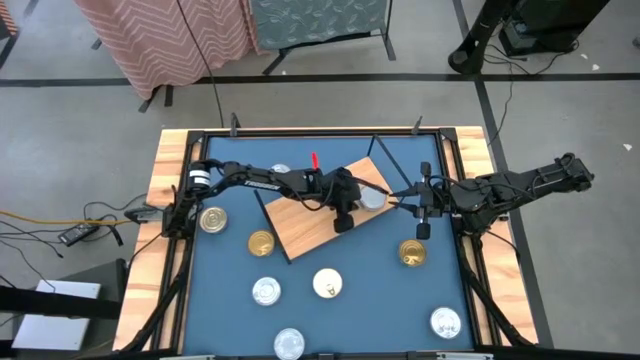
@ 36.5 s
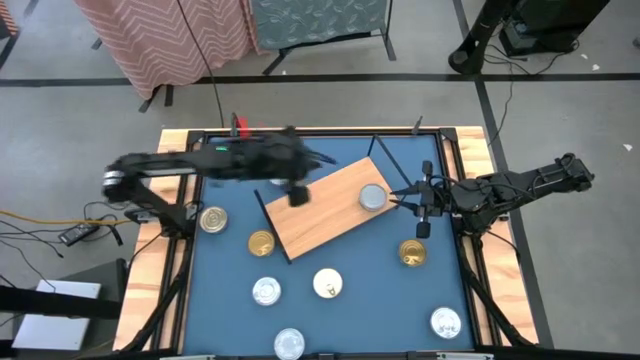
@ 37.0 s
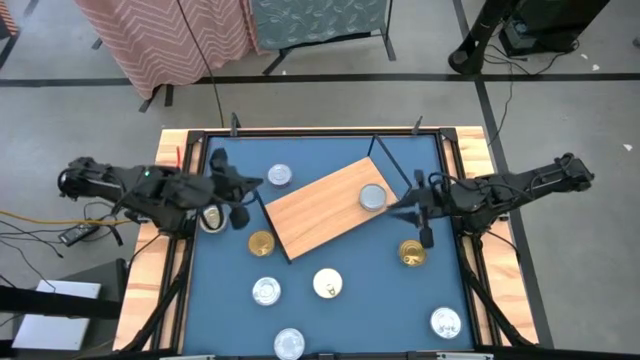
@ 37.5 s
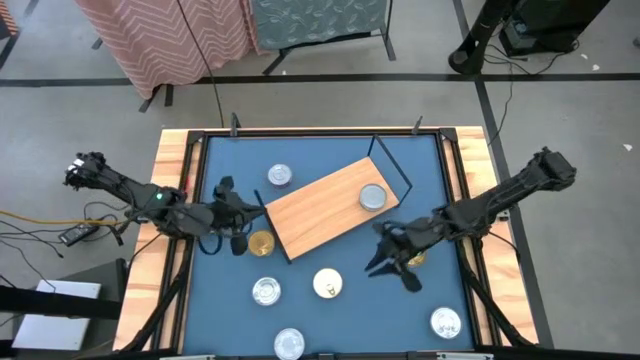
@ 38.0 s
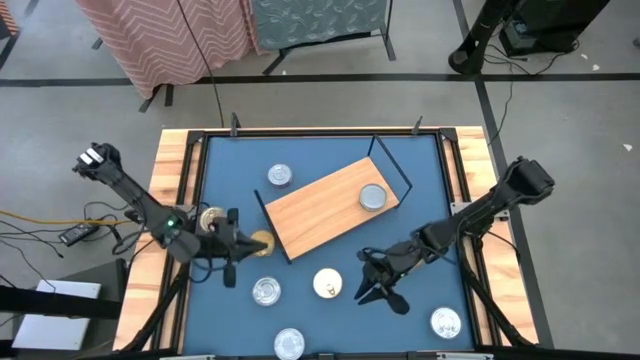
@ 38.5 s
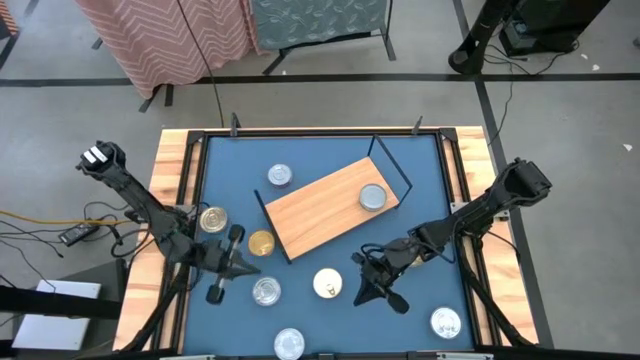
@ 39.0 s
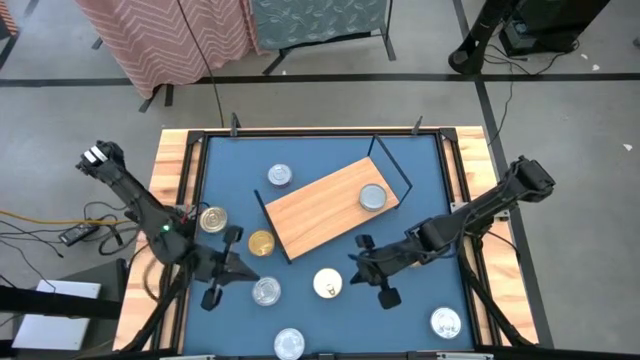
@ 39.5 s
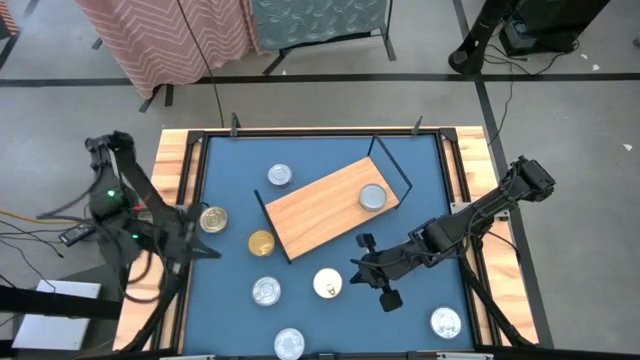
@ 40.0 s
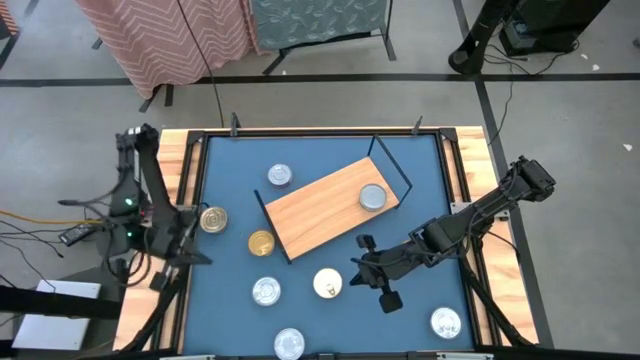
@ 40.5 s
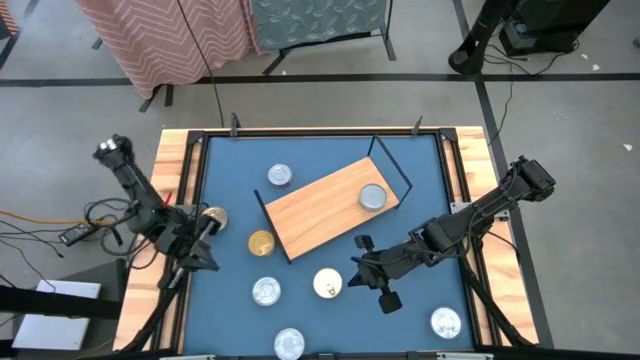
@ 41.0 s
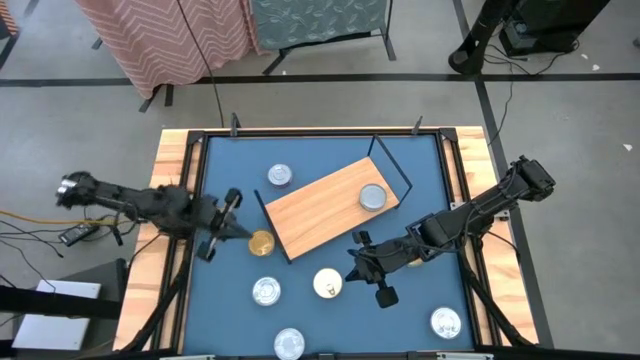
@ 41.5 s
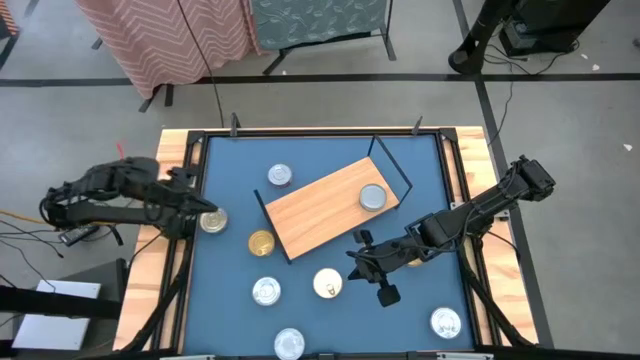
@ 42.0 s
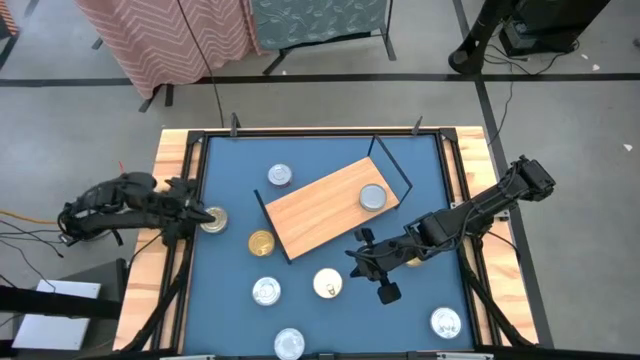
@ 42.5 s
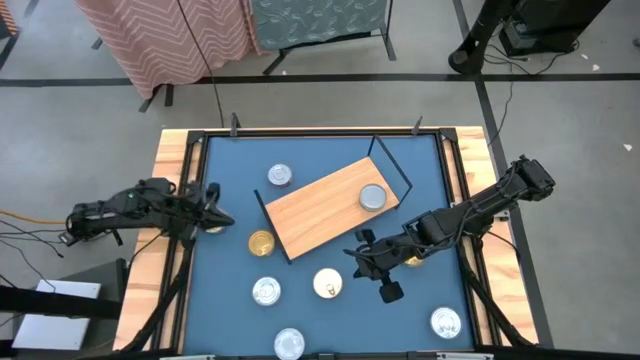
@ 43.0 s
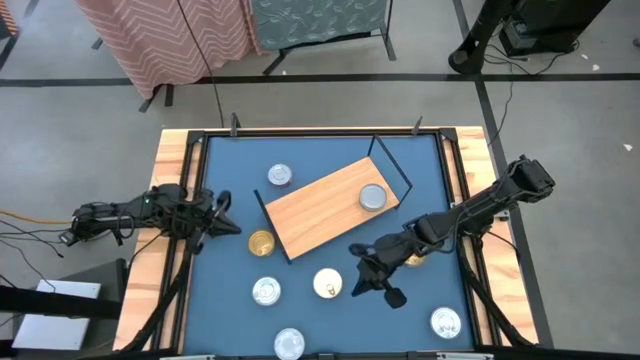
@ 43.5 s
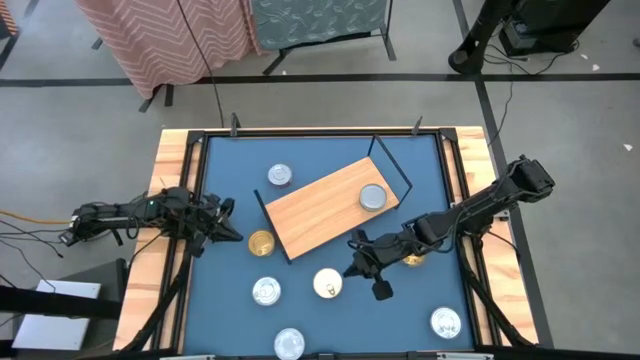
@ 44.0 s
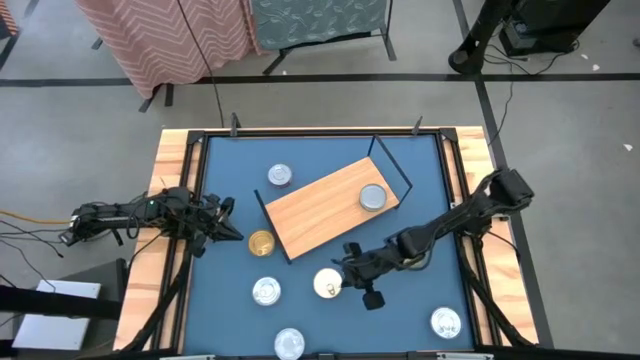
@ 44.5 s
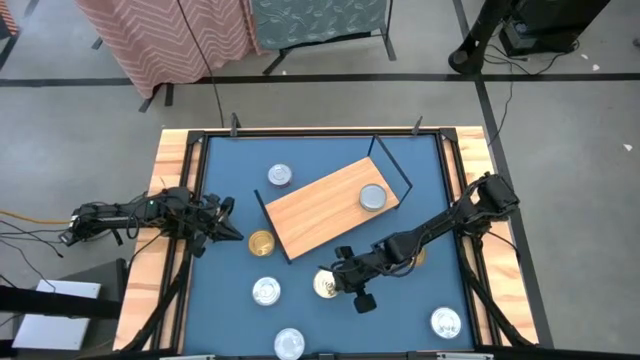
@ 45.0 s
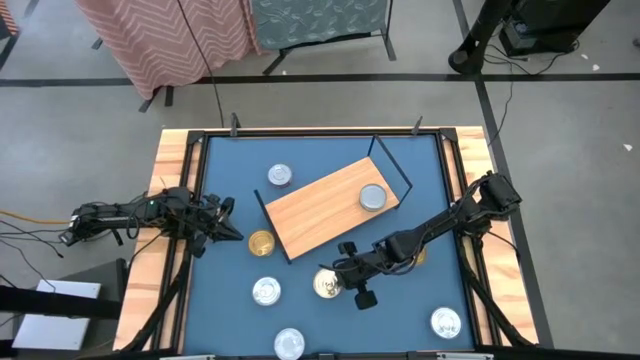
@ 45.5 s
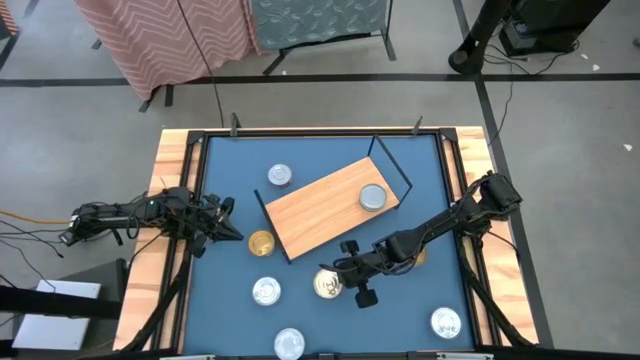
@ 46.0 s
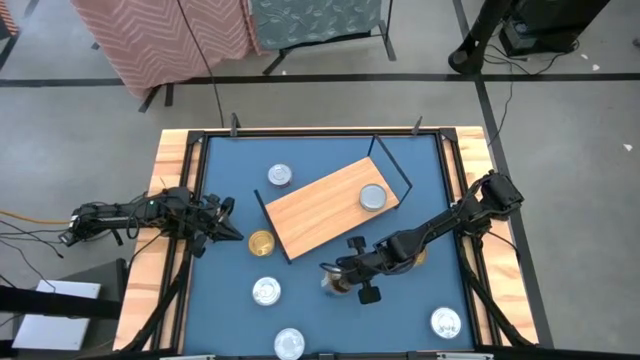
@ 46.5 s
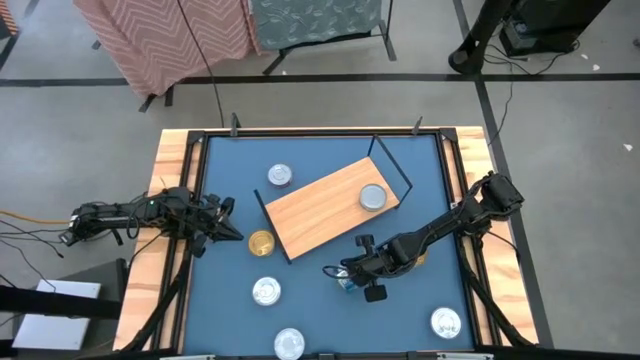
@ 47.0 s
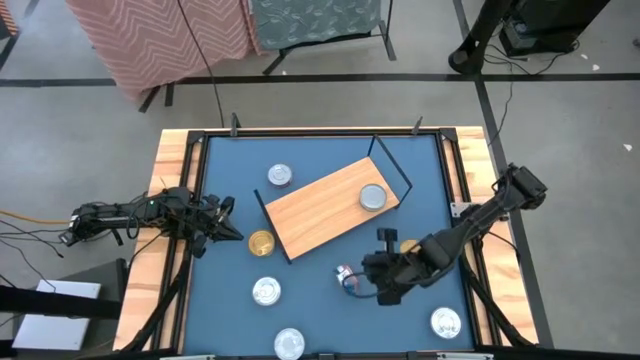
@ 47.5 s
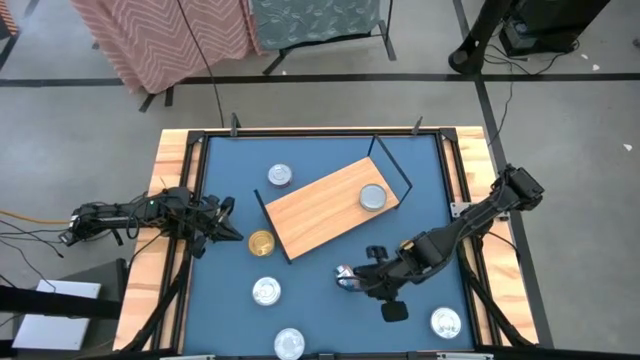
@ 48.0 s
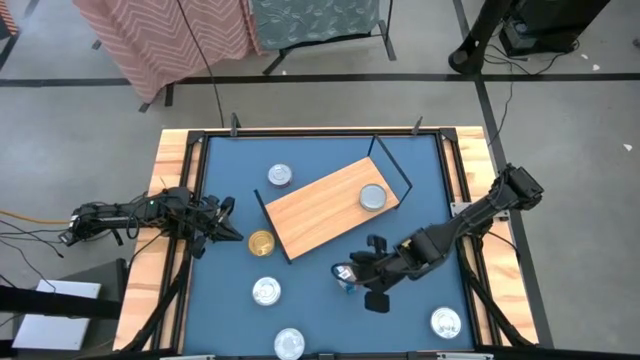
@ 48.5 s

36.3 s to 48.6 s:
Task: Stack canned seafood by type on shelf
Put the blue/pink tuna can on the shelf

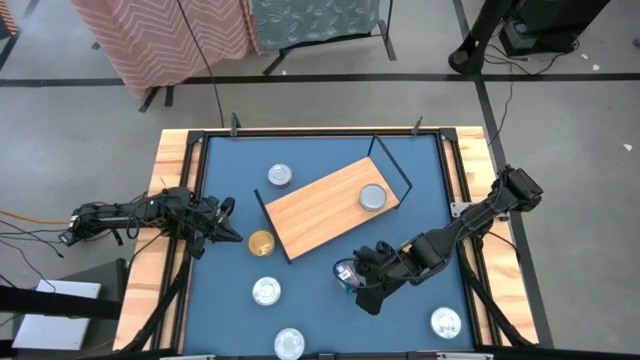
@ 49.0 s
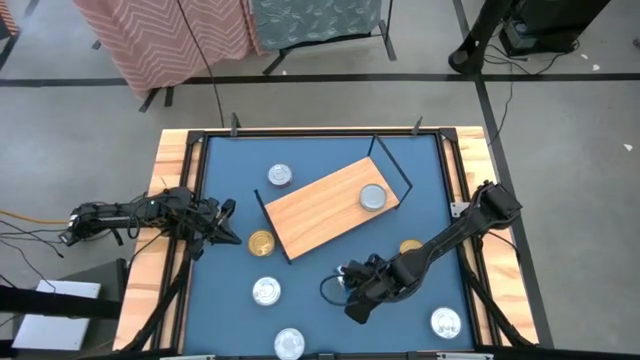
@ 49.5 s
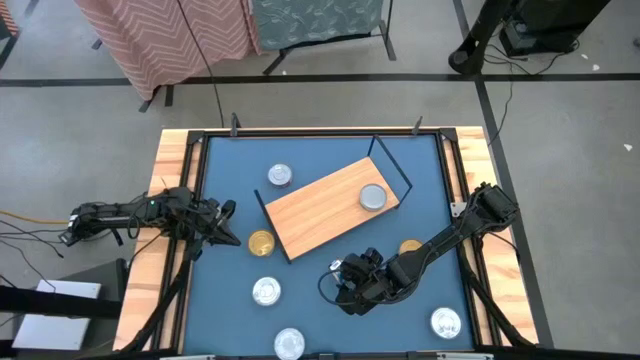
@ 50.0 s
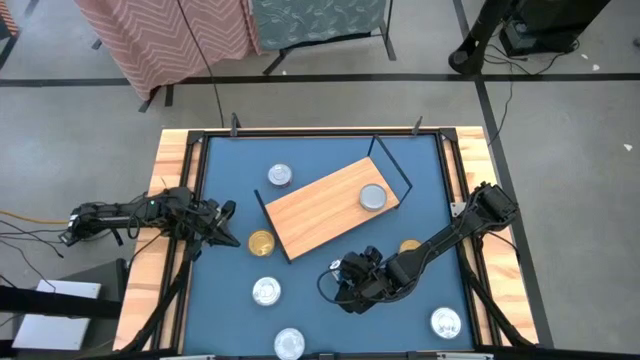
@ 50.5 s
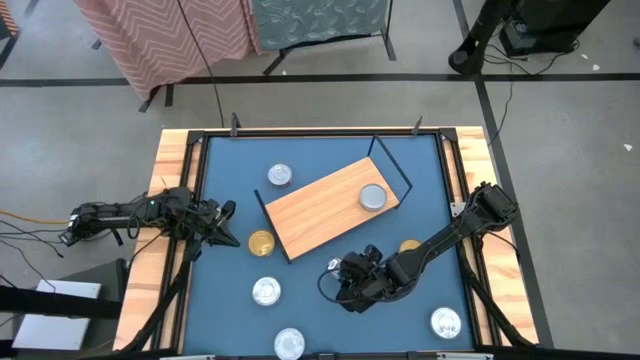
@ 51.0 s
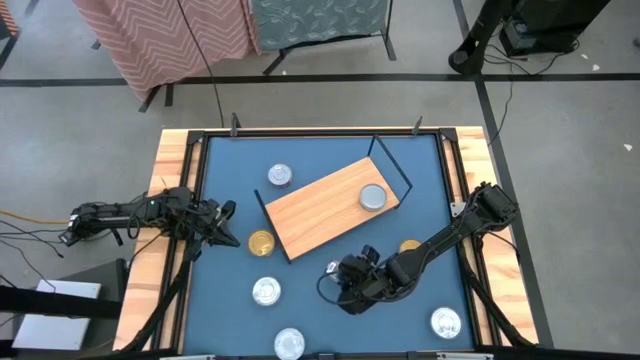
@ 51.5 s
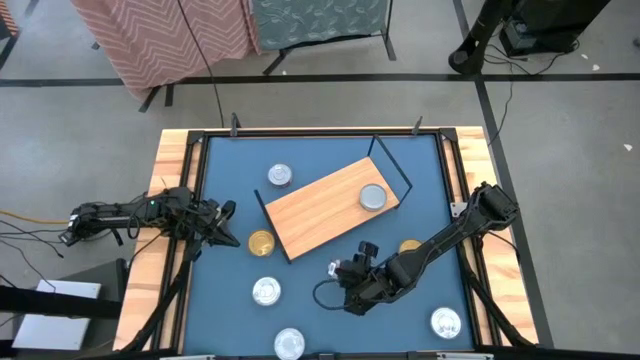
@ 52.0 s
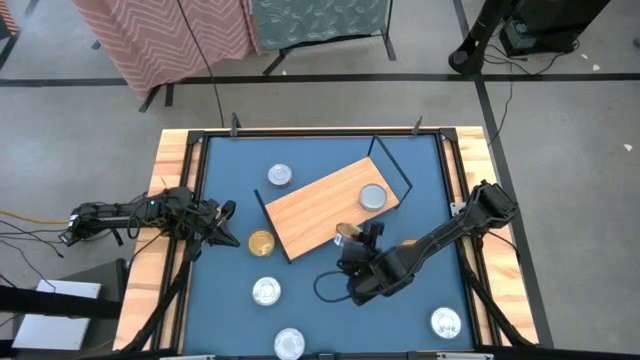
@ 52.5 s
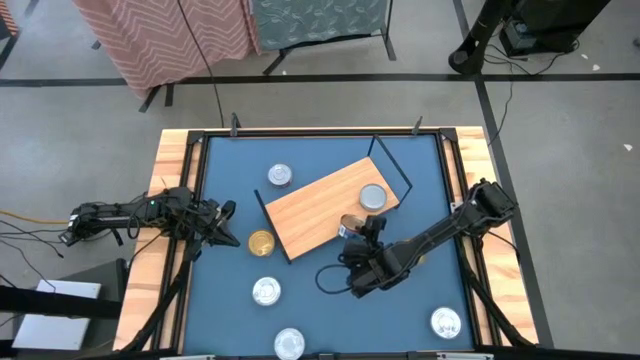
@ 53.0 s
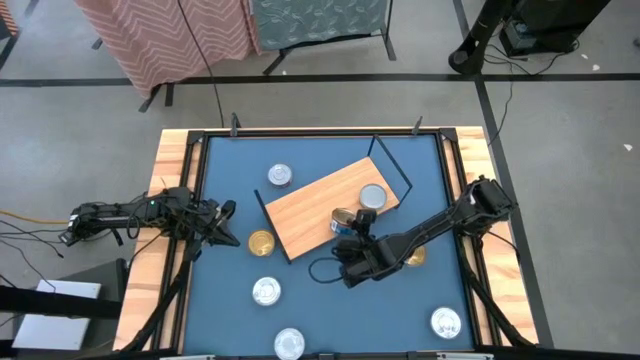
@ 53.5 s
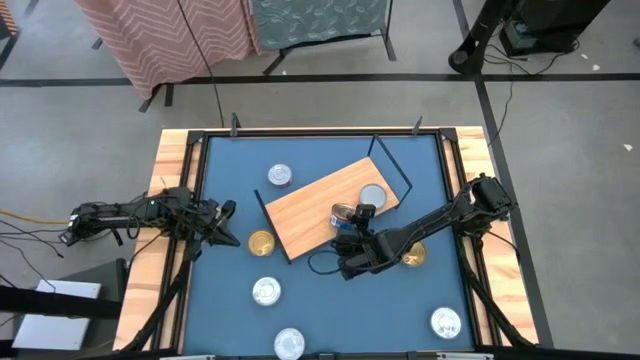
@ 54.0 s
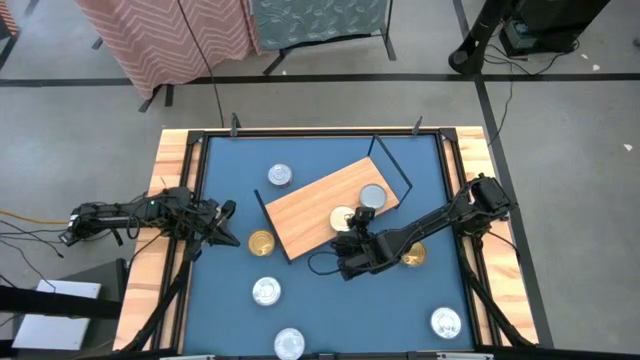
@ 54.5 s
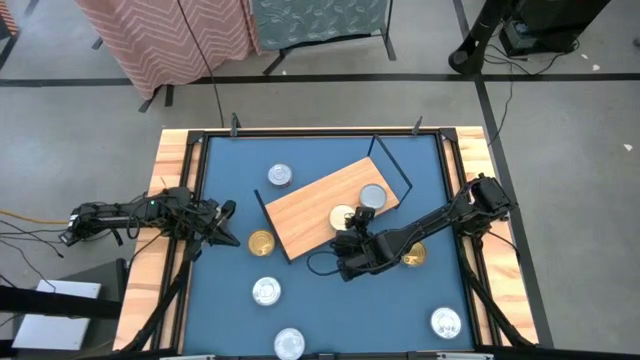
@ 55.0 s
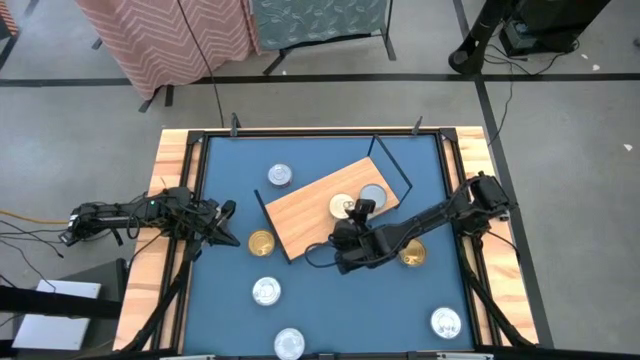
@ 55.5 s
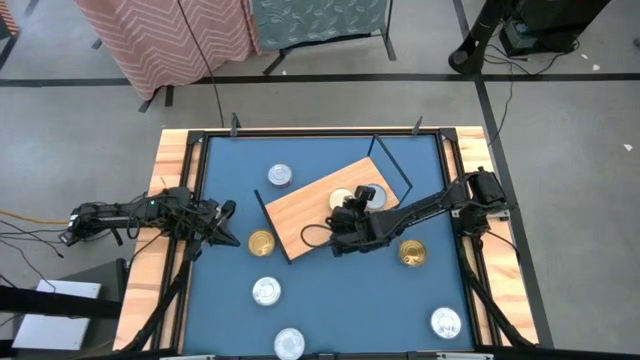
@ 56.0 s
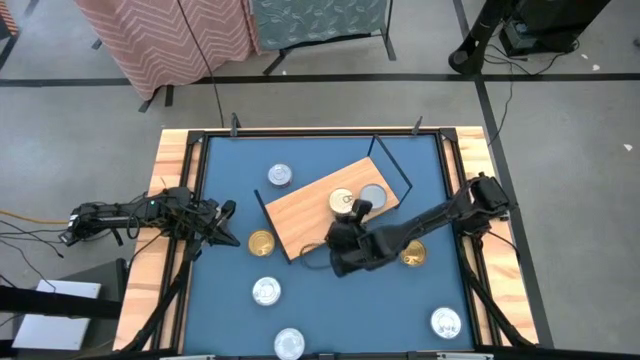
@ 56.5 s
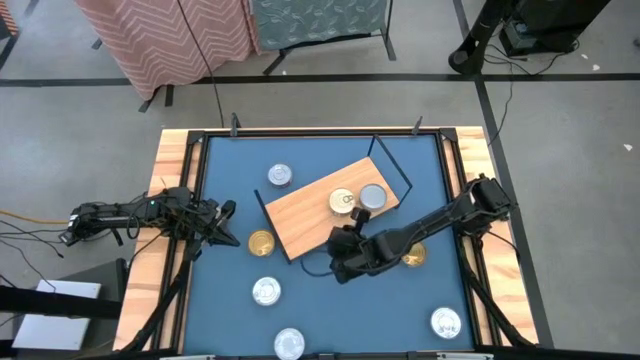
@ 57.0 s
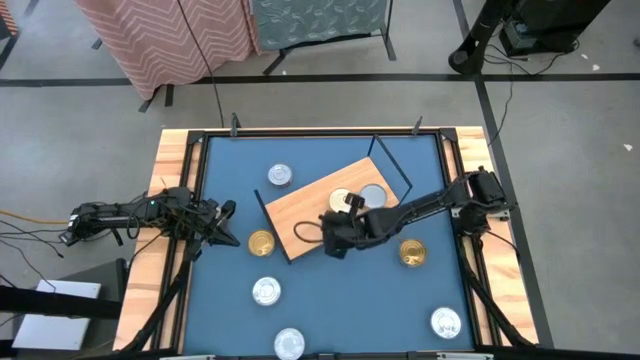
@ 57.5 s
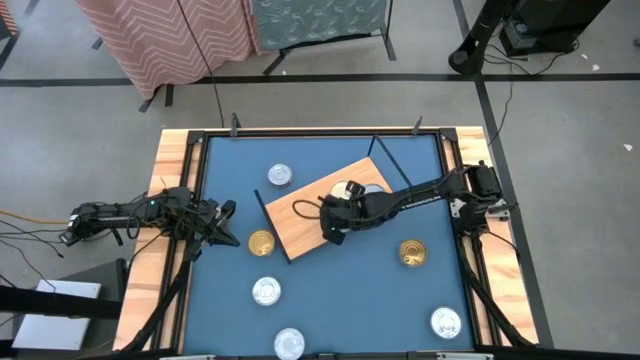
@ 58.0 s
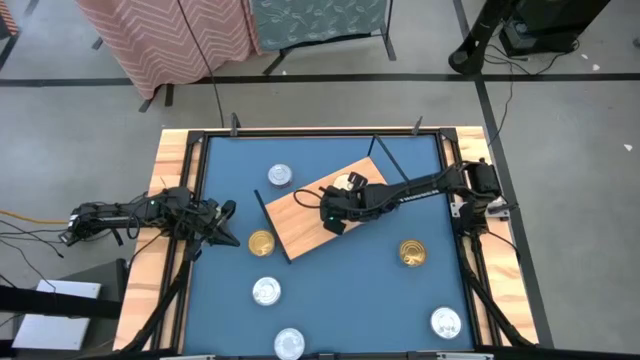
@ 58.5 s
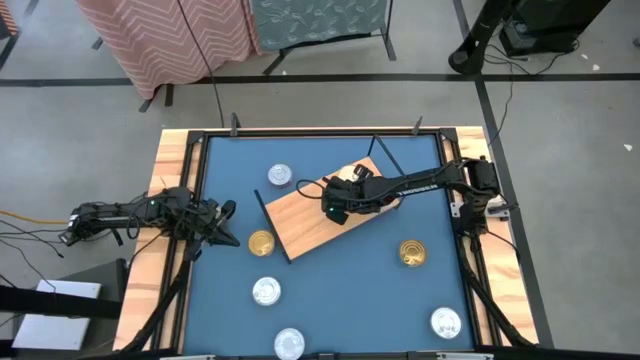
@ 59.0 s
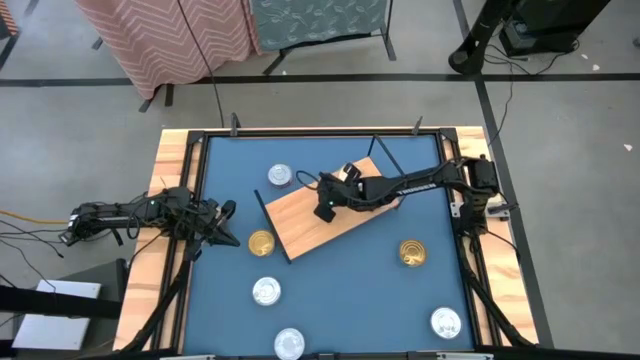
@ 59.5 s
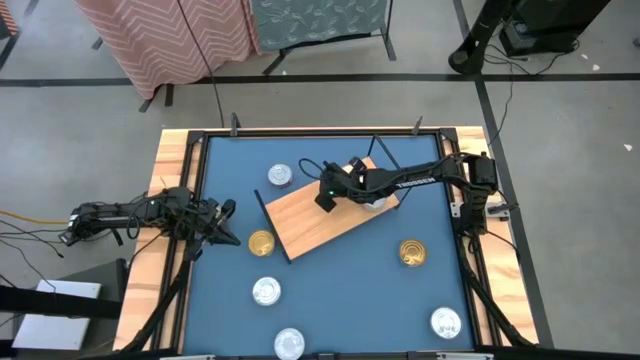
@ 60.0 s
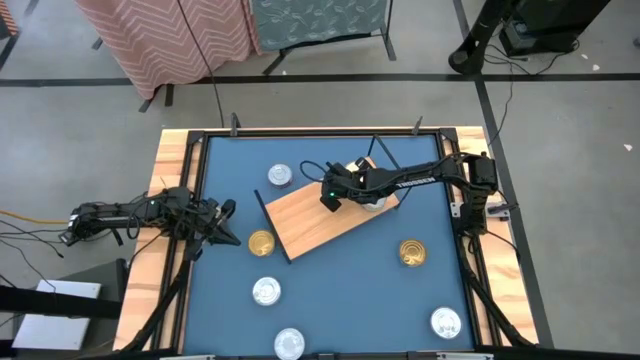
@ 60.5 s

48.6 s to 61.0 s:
Put the blue/pink tuna can on the shelf
